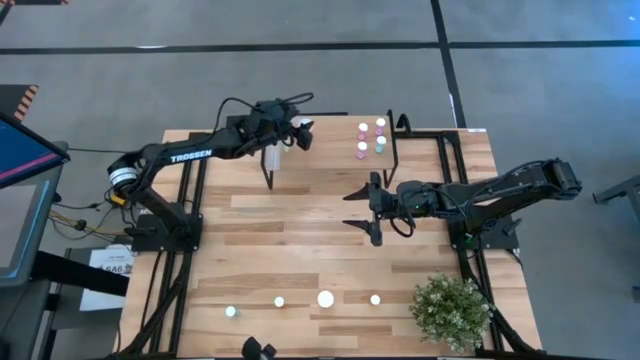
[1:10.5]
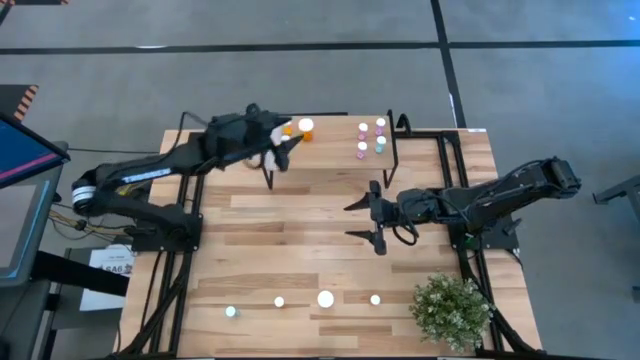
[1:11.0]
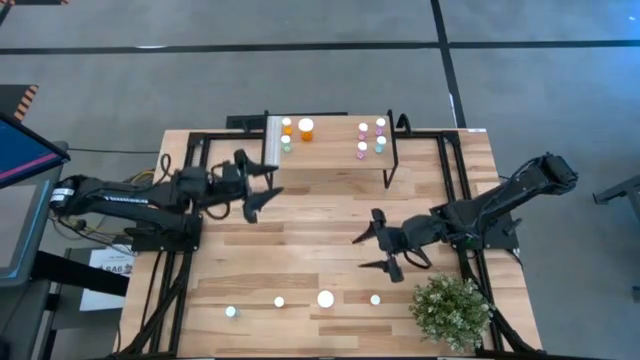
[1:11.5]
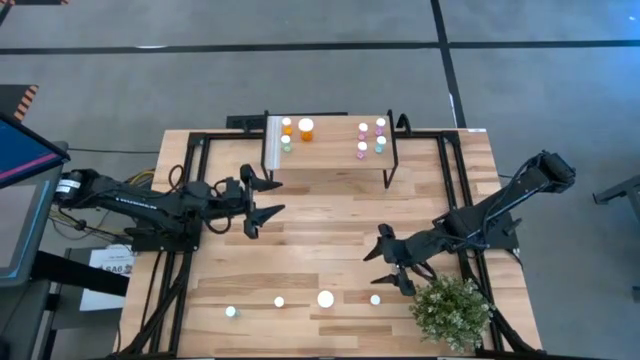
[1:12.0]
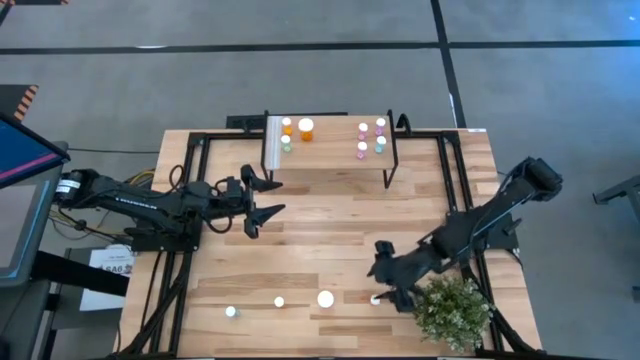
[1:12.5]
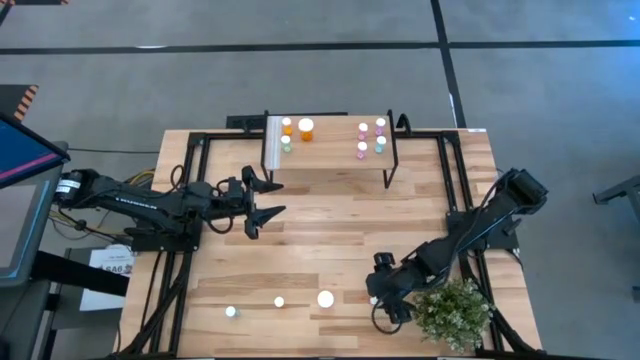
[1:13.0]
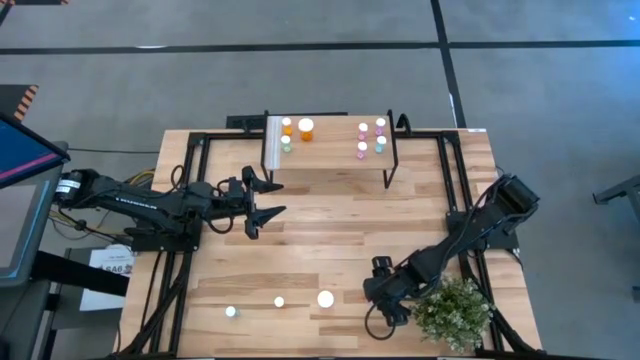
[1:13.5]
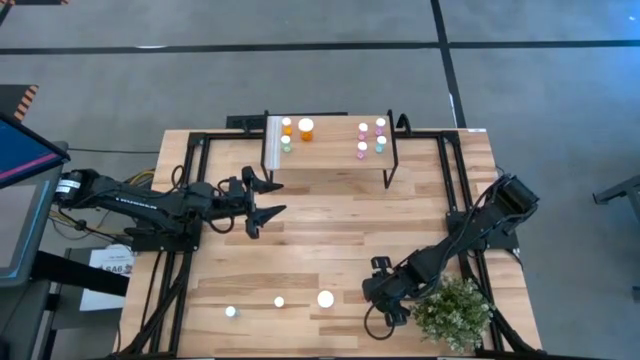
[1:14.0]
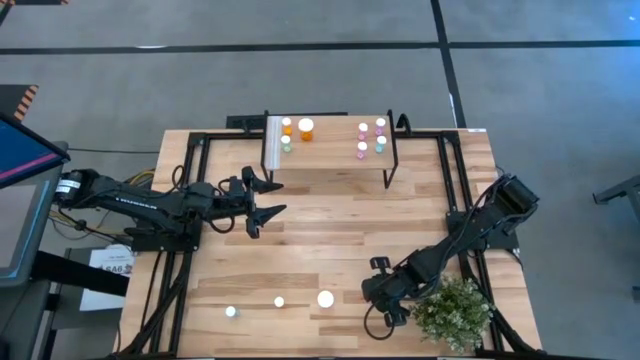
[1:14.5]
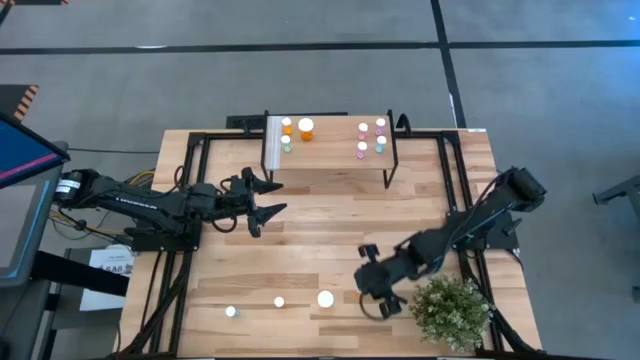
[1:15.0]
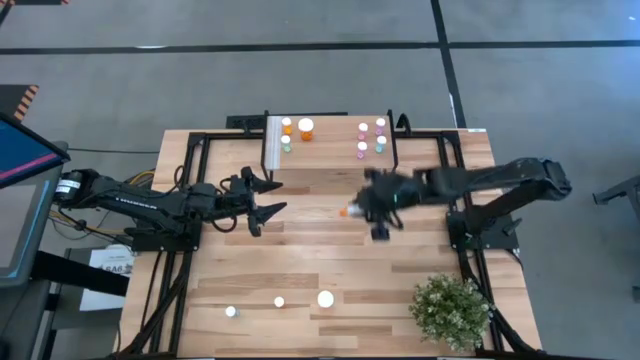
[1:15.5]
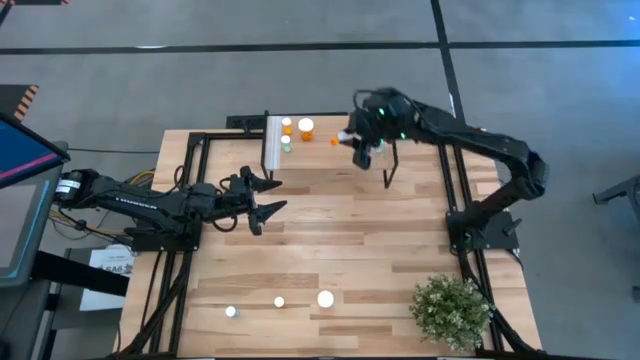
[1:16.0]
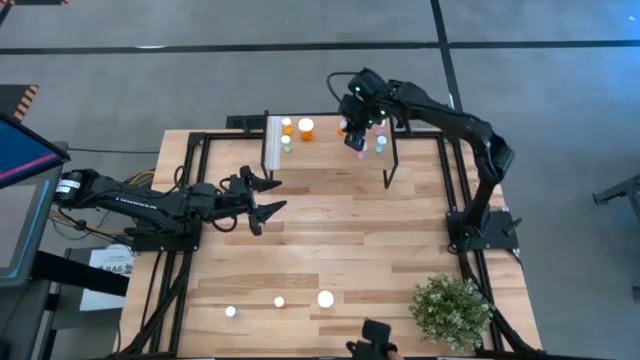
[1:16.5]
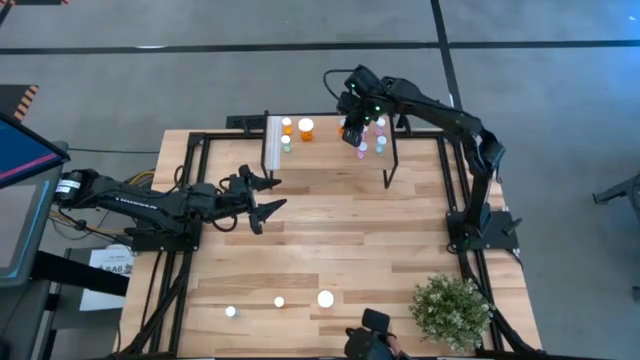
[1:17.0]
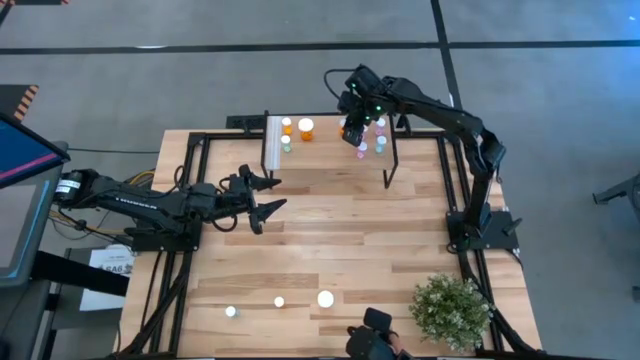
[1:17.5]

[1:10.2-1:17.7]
Task: Pick and place medicine bottles onto shelf by color
Put the right small orange pill bottle on the shelf

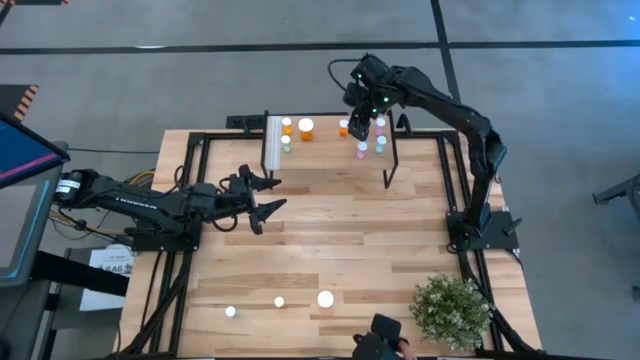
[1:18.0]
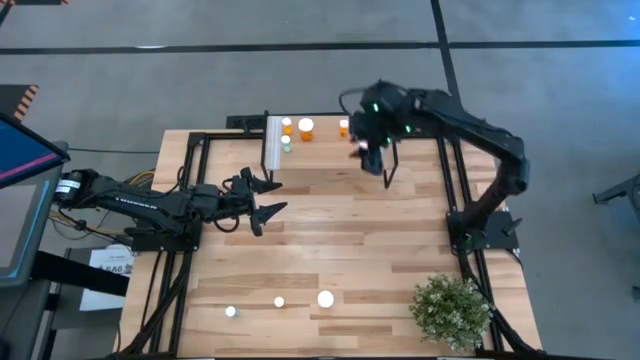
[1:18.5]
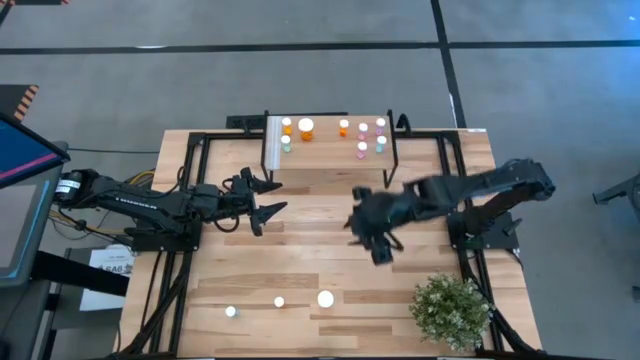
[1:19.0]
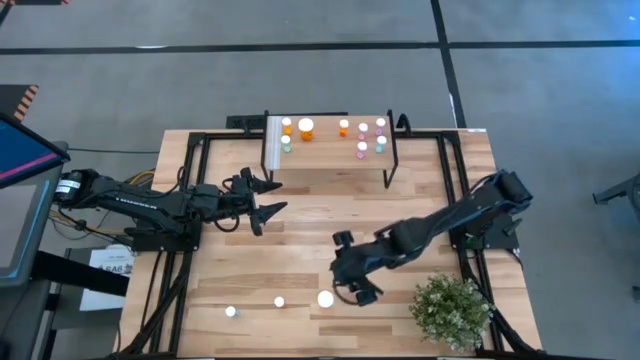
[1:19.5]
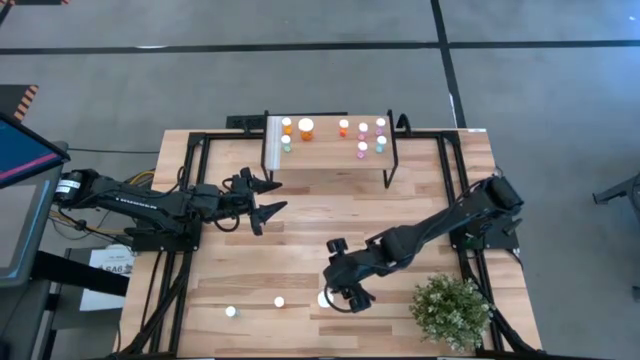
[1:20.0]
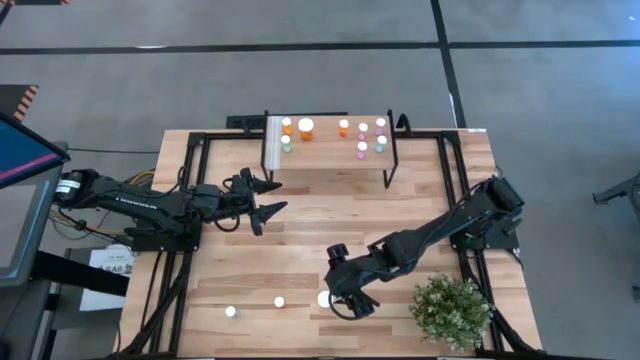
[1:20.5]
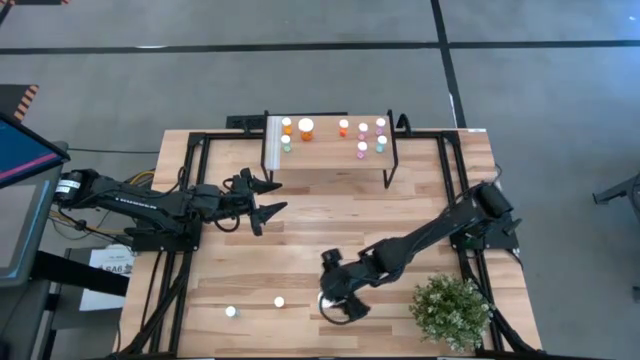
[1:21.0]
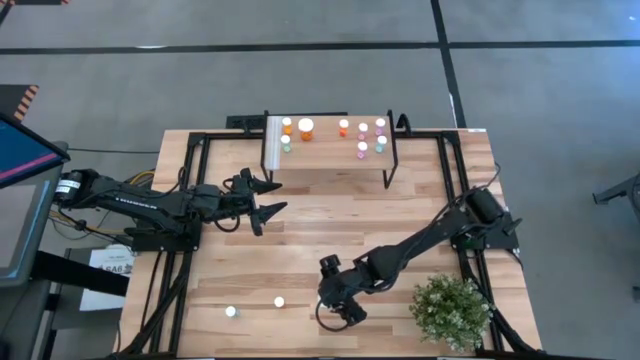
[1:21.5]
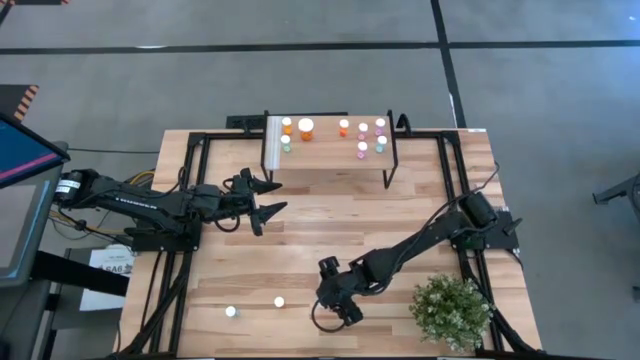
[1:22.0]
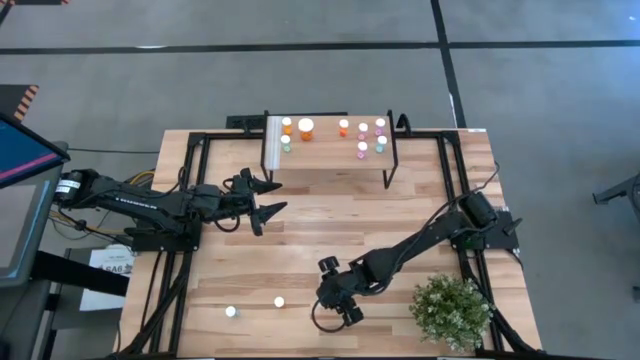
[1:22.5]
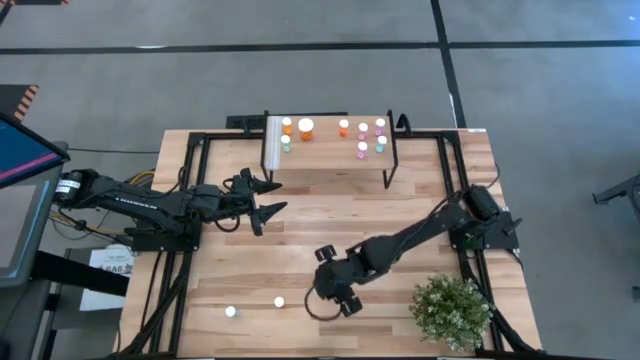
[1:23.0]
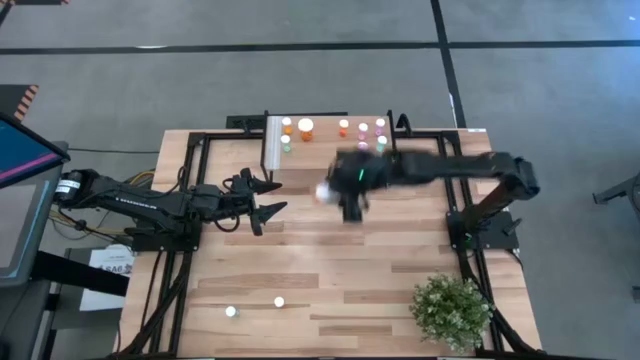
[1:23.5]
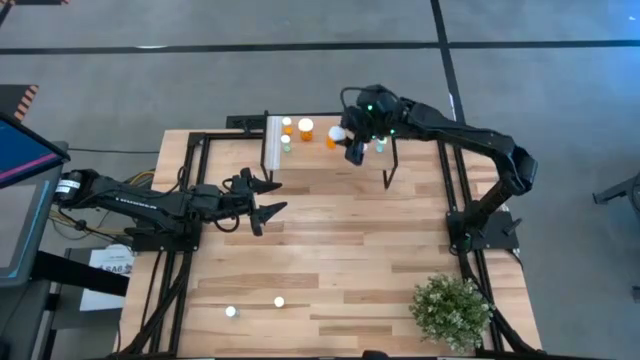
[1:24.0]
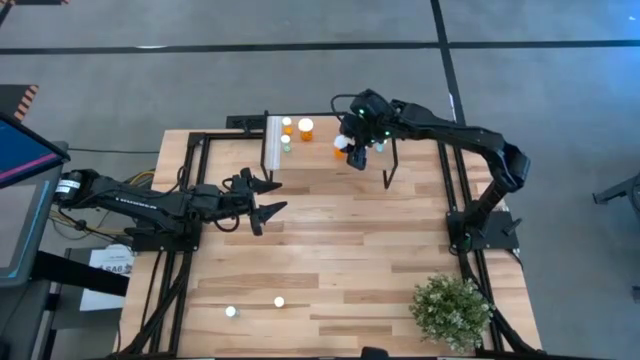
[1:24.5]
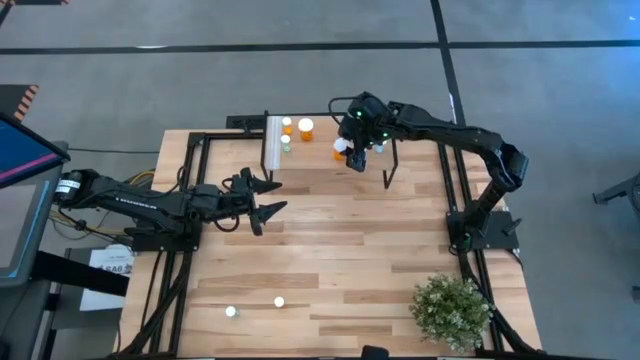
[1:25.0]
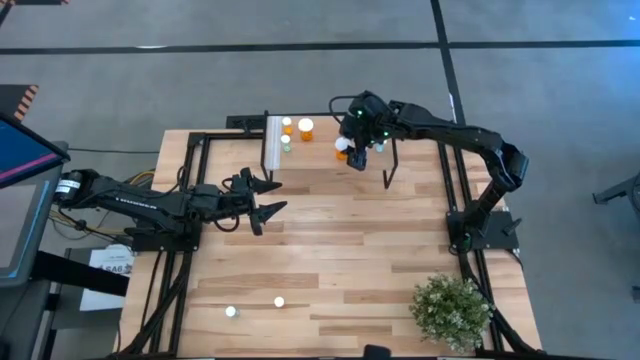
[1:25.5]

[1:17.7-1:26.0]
Put the large orange pill bottle on the shelf

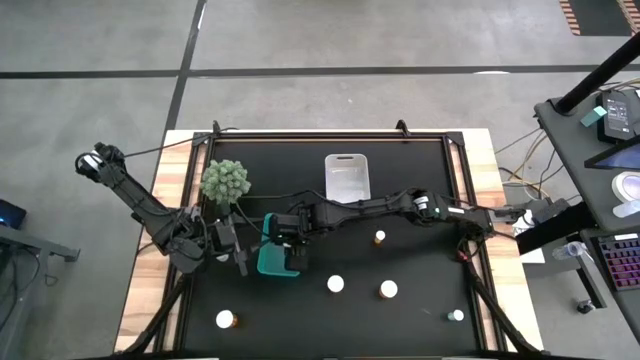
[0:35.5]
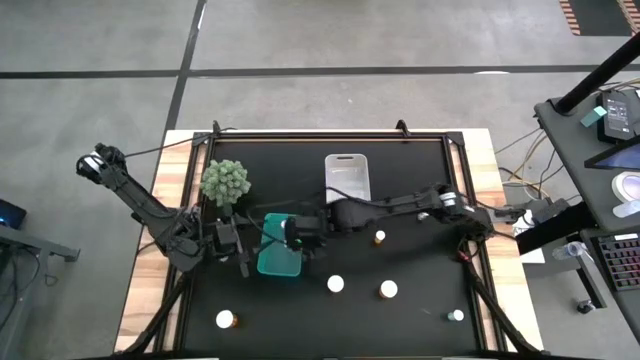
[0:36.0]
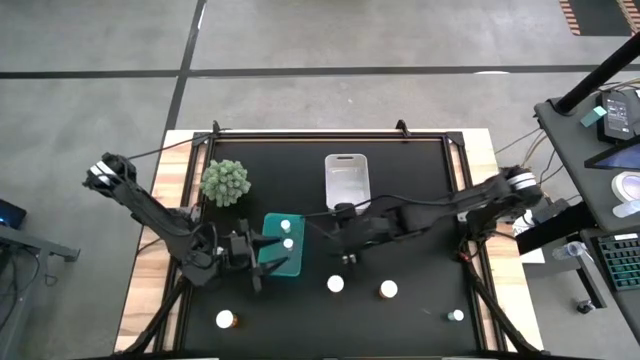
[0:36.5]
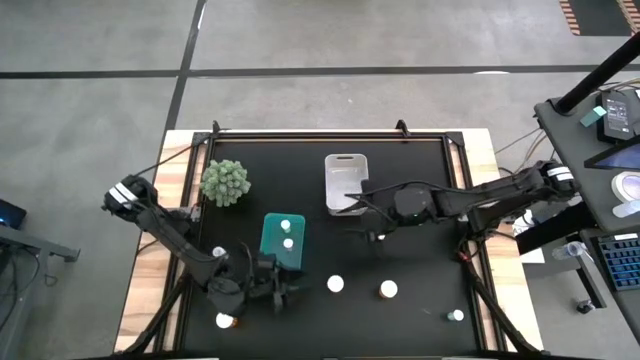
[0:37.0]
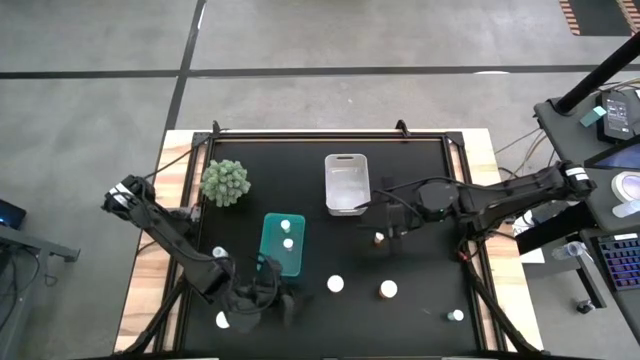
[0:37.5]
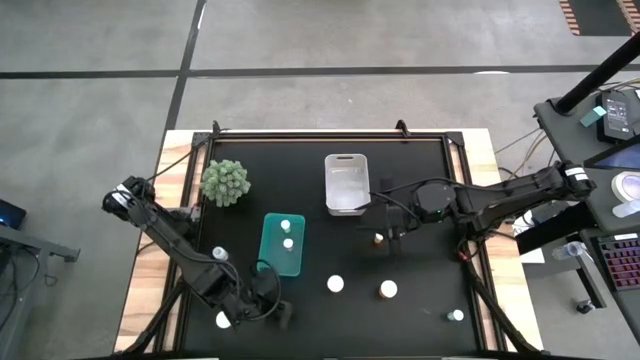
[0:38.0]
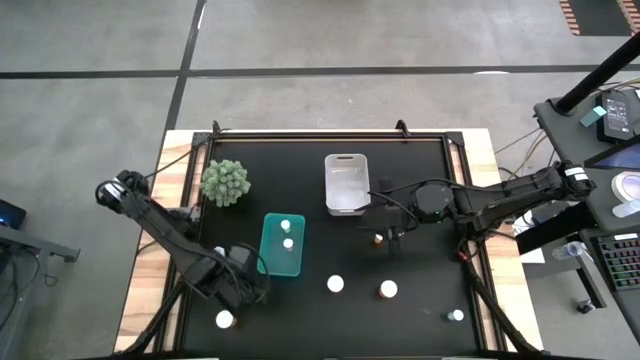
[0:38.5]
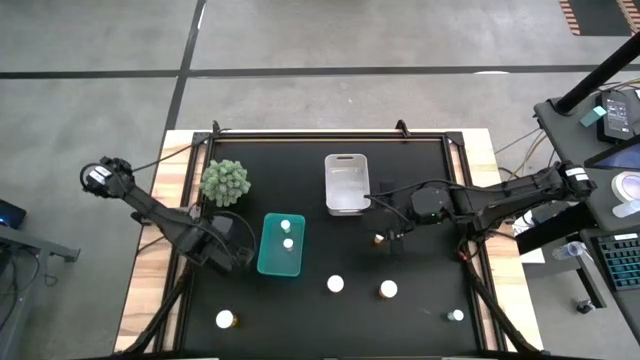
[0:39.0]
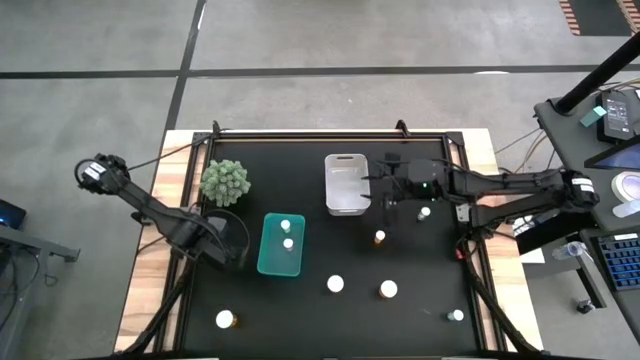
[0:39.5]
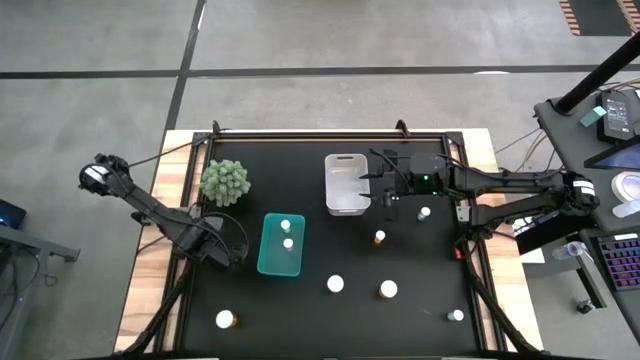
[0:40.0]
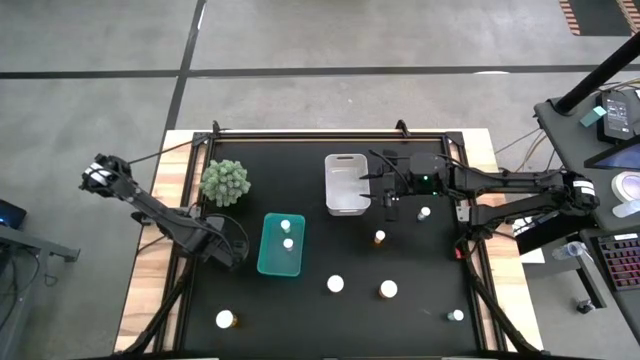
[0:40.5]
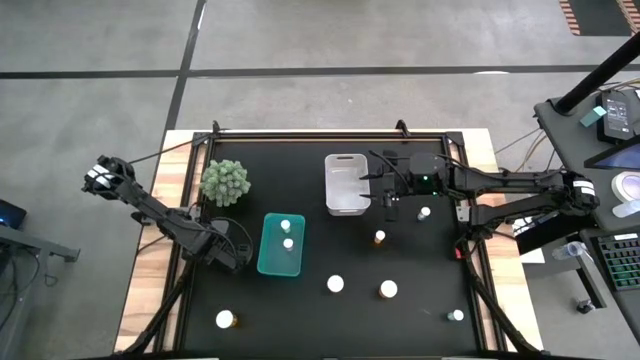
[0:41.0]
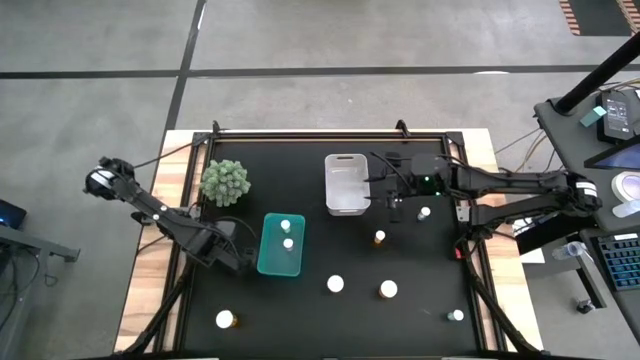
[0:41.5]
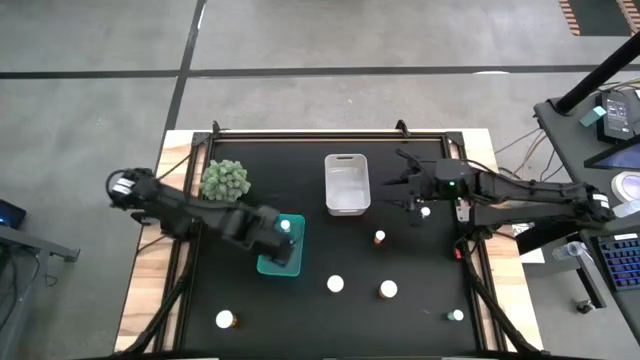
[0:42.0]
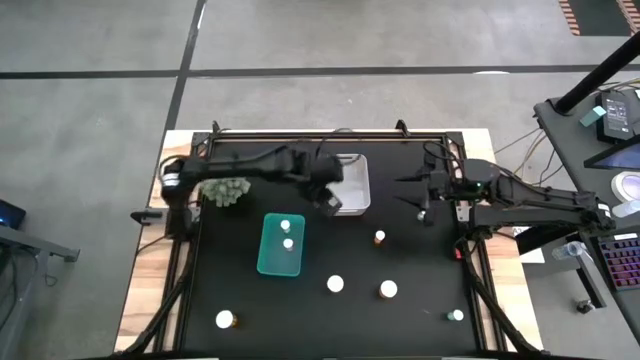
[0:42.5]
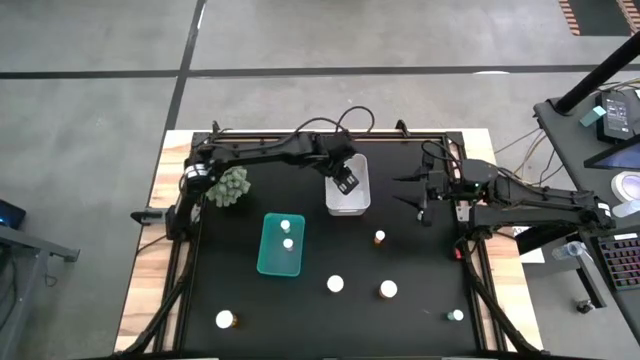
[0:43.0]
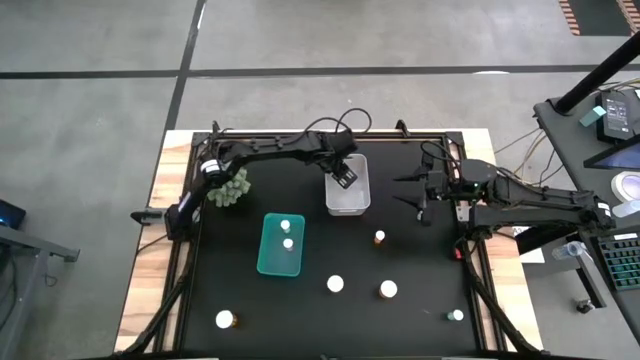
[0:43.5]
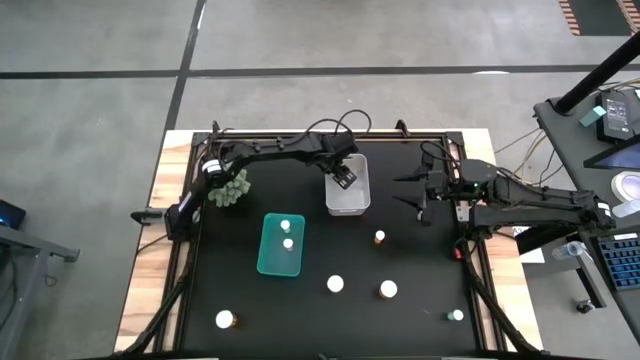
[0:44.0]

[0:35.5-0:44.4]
Task: Pick and place medicine bottles into bin by pill shape (circle, oval)
Put the left transparent pill bottle into the white bin
